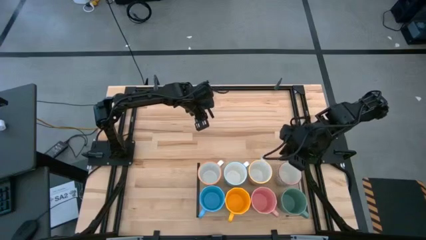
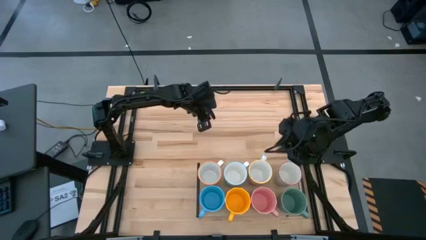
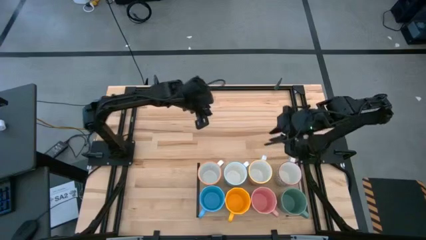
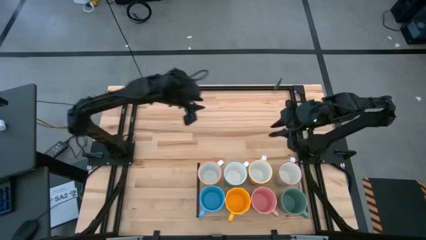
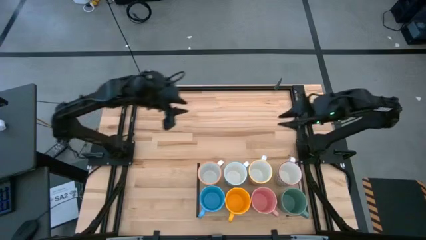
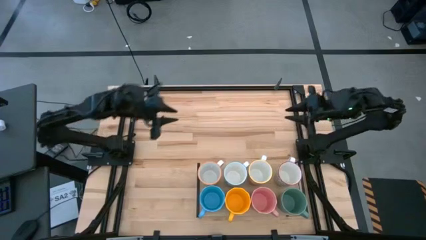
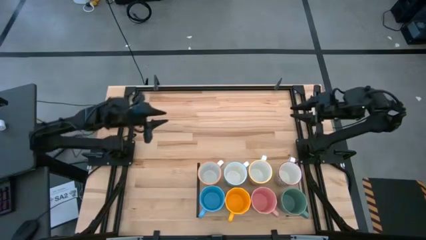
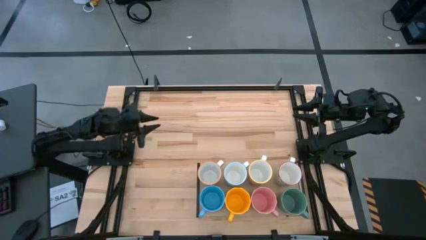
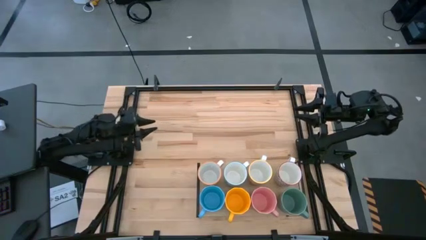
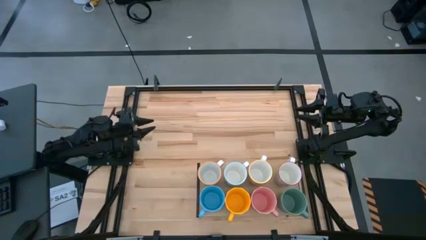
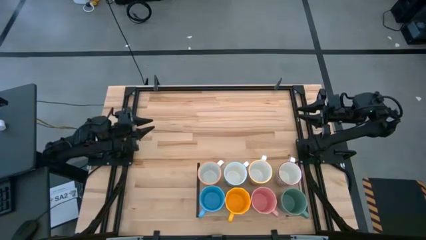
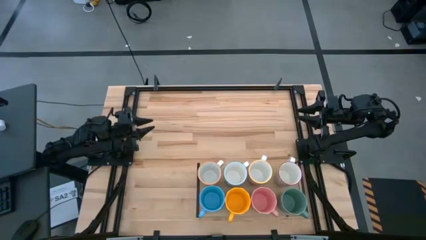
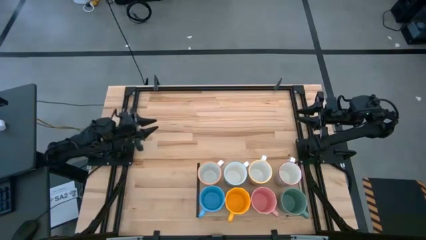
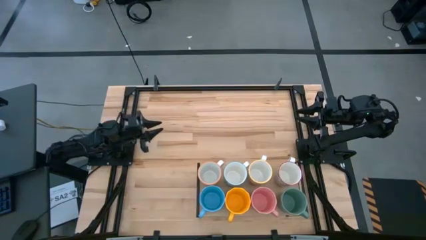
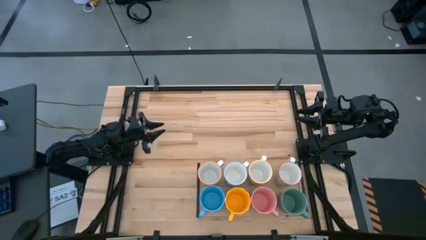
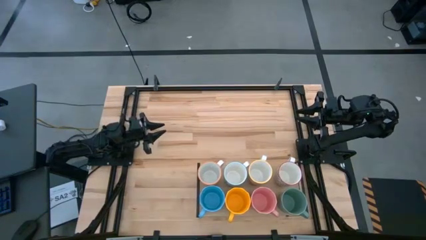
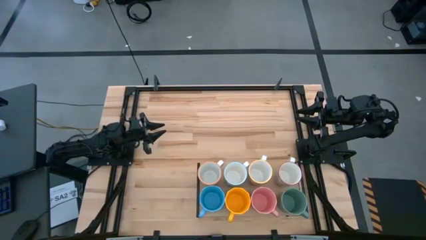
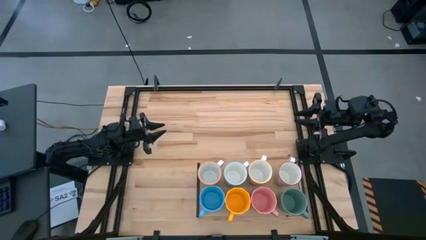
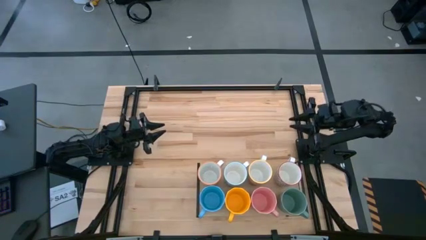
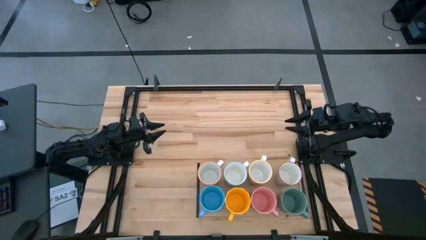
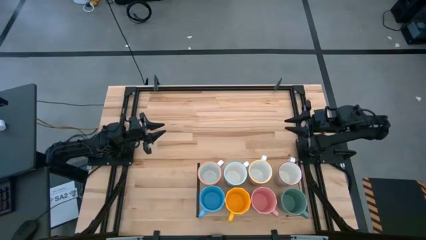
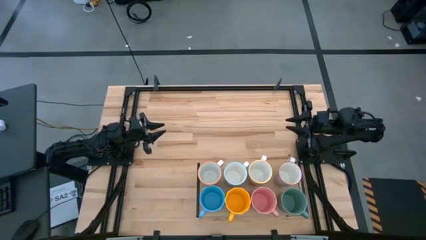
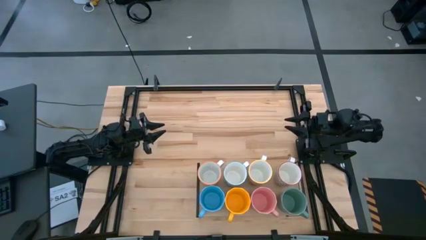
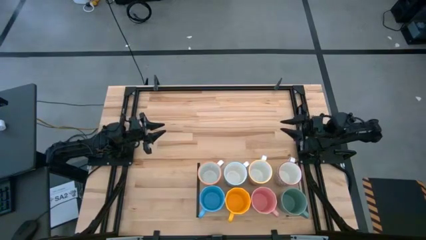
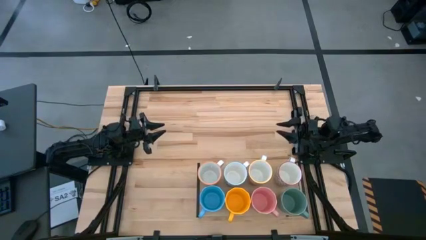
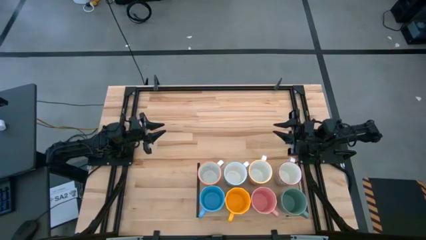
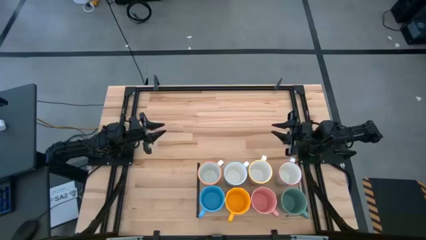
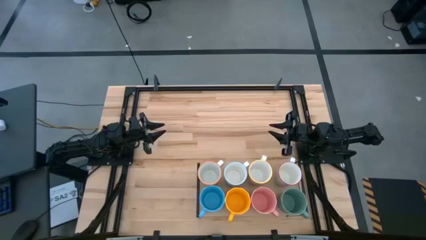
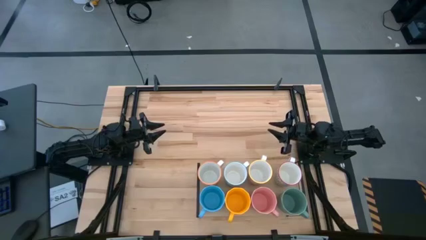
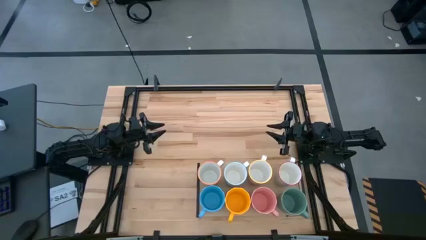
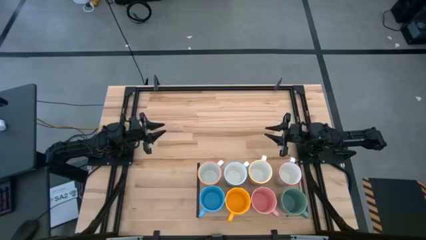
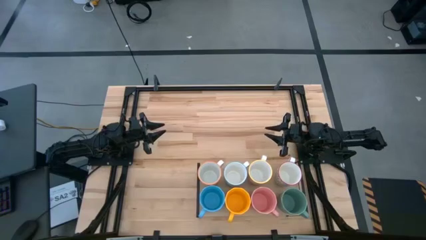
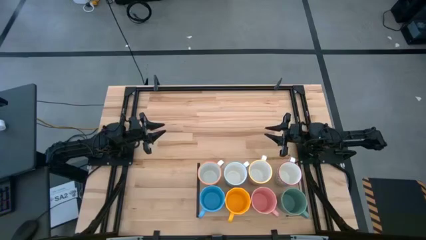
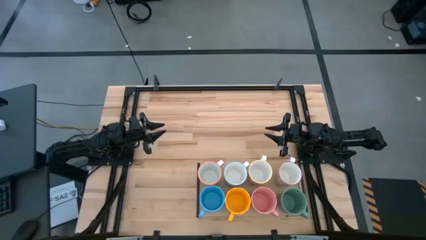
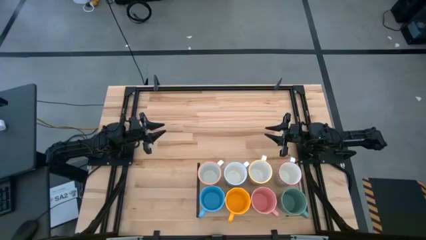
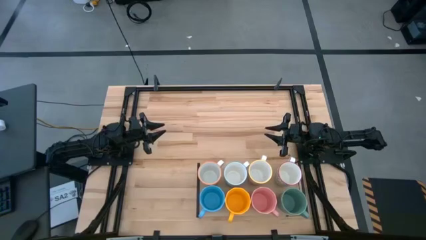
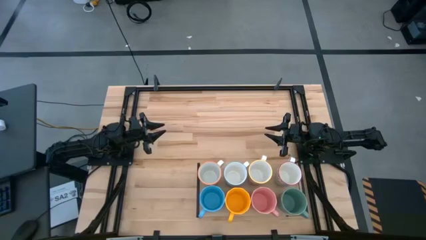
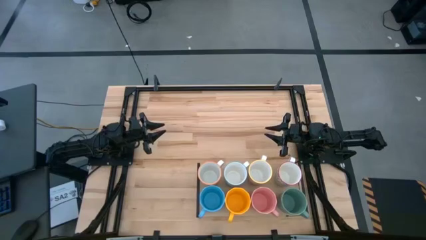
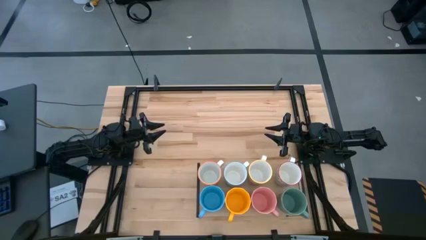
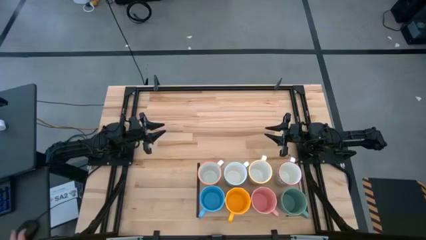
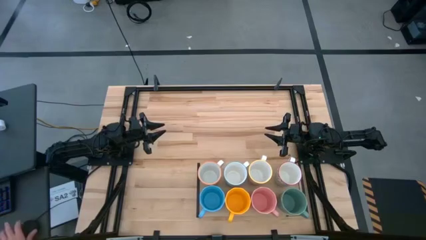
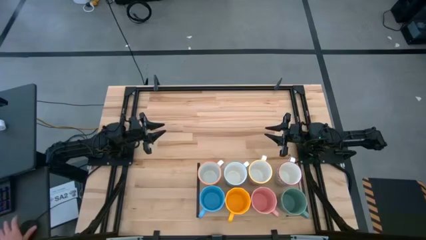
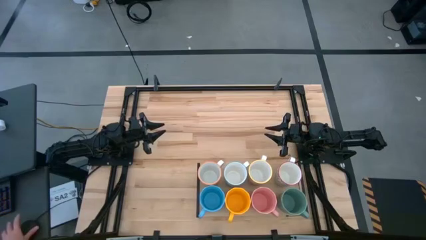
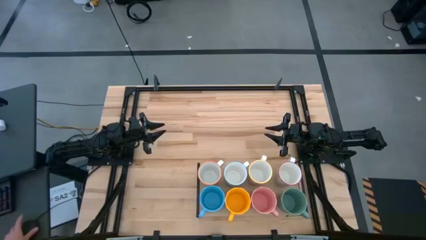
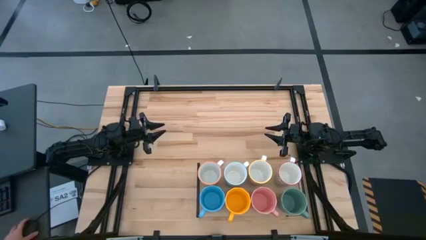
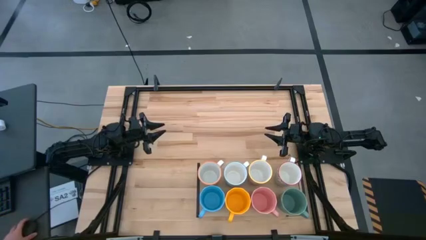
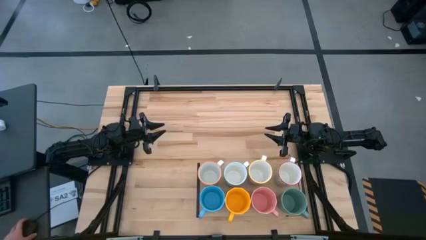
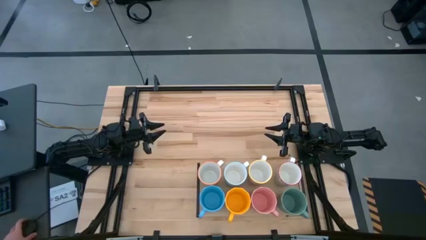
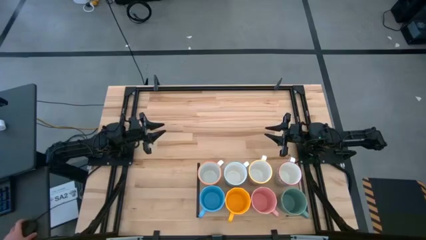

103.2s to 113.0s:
Task: Place coffee mugs
Return to Home Position

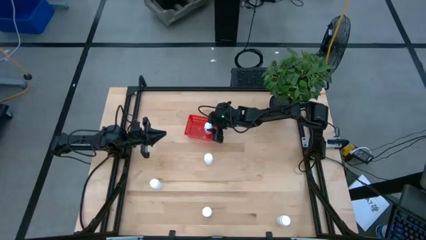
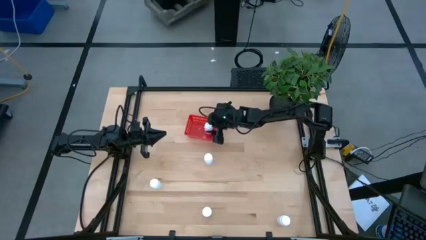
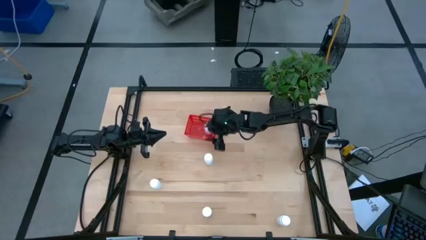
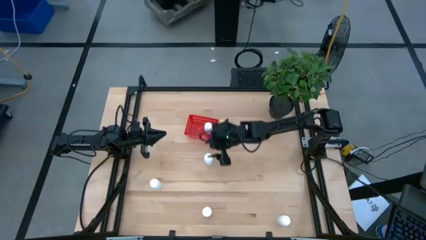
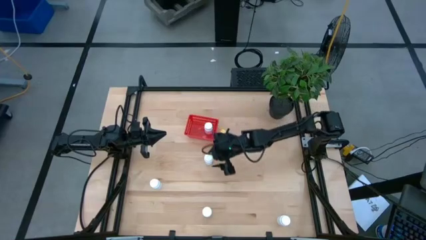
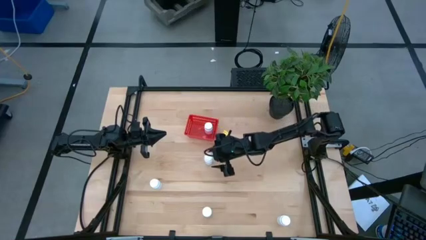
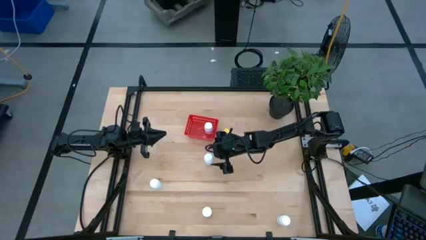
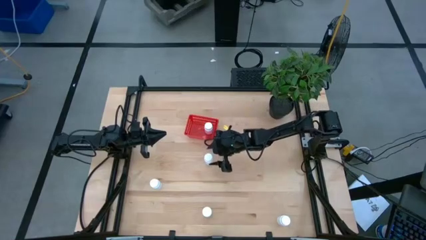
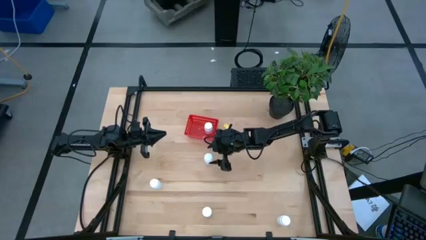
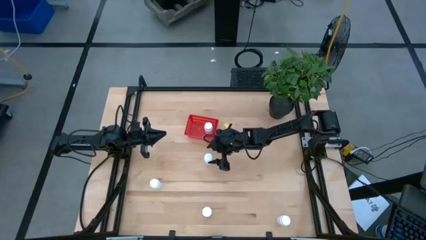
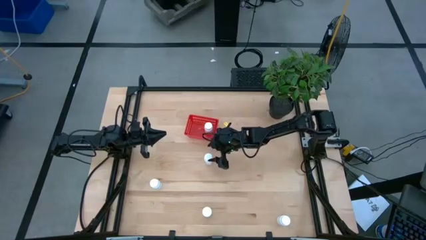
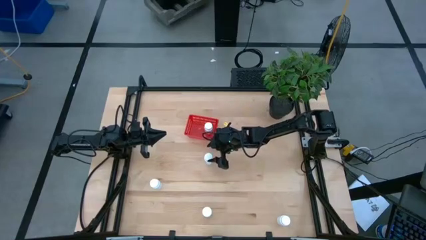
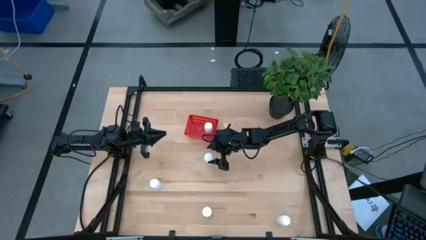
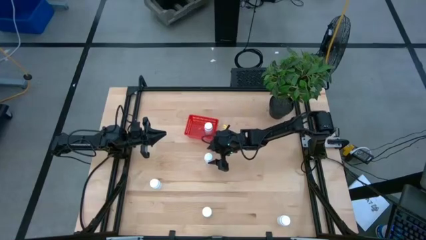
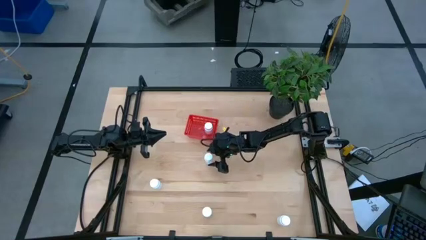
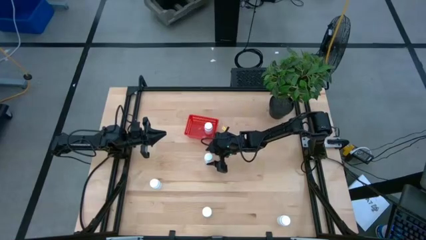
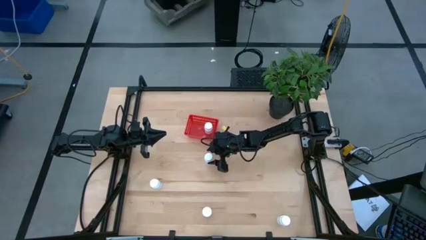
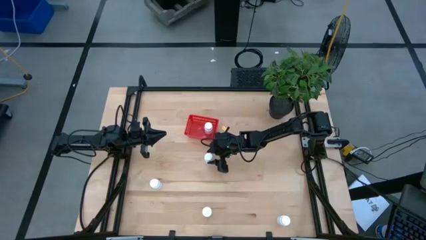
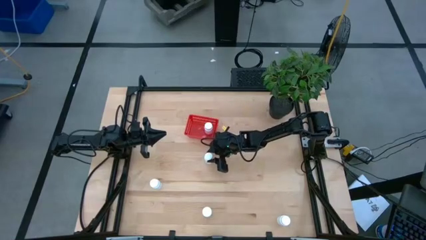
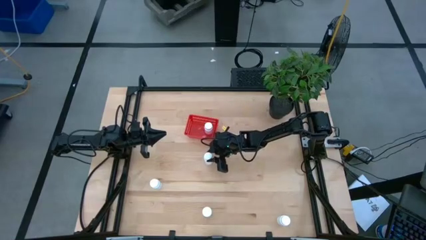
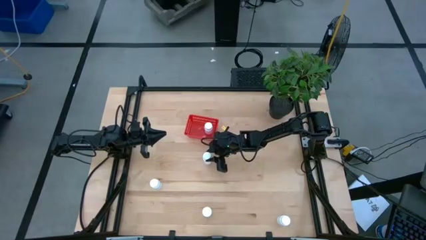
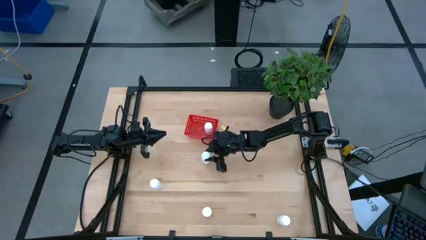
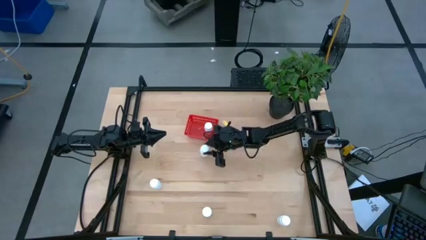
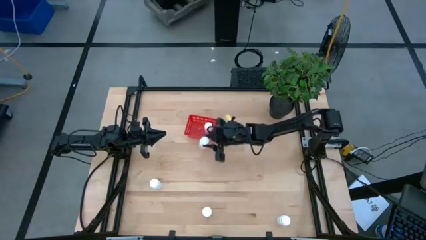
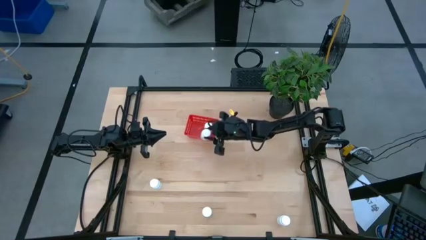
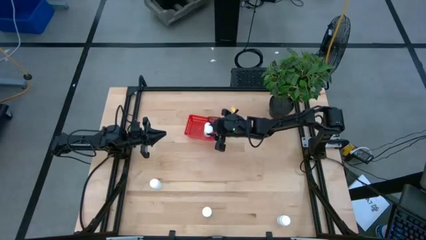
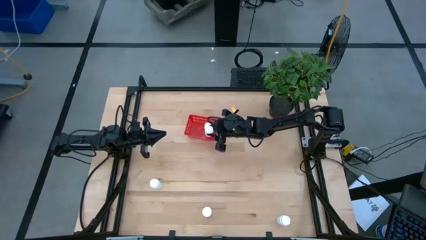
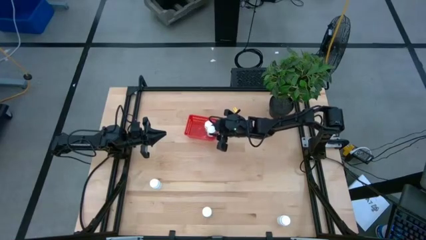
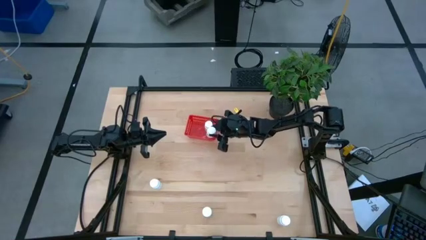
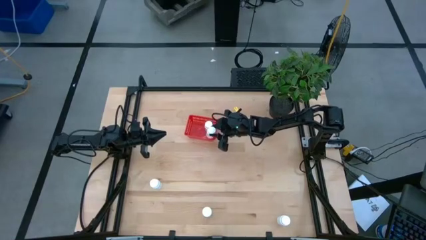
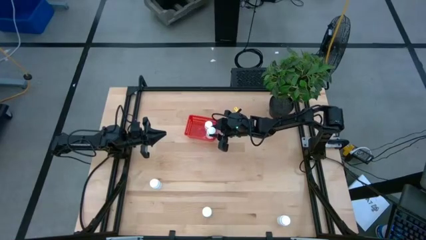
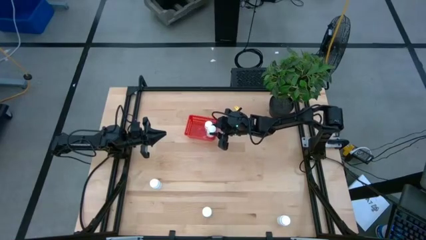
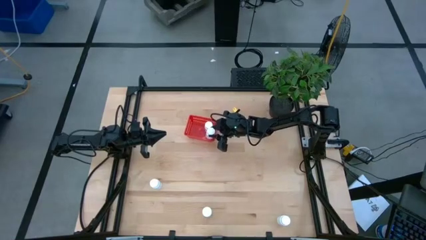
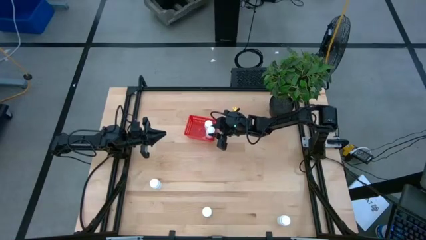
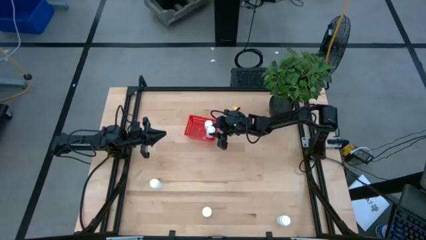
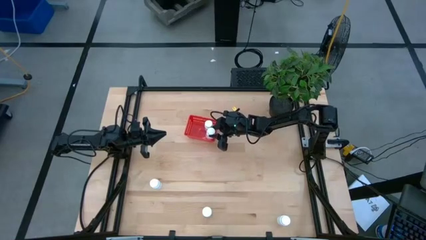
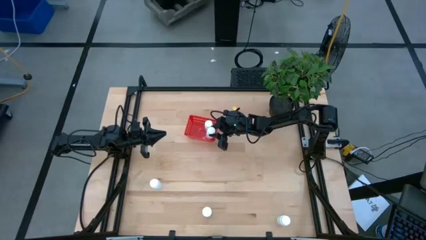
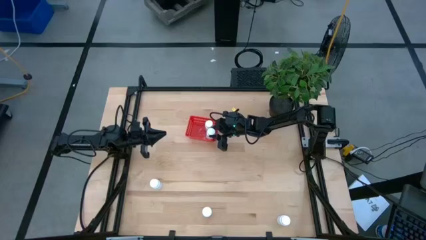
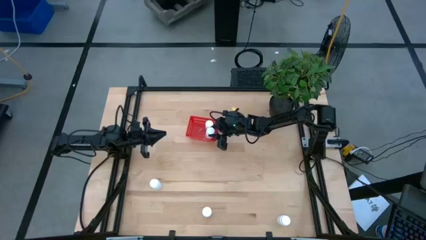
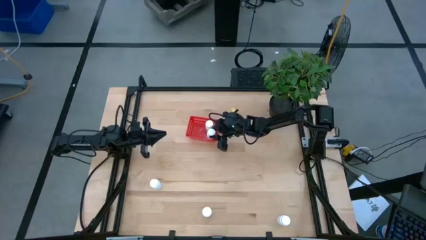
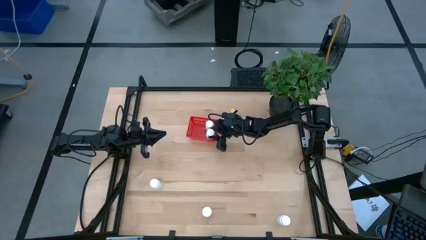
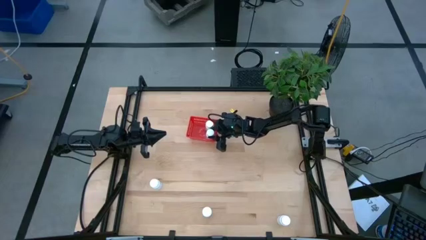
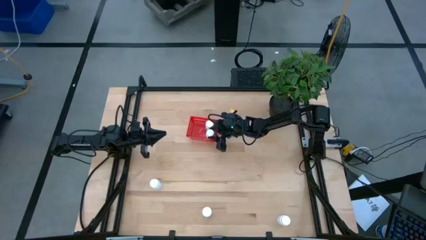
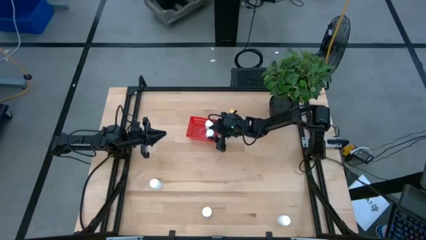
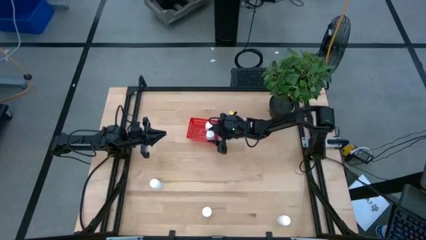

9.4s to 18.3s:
Task: Pick and place pill bottles into a basket
Put the white pill bottle into the red basket
